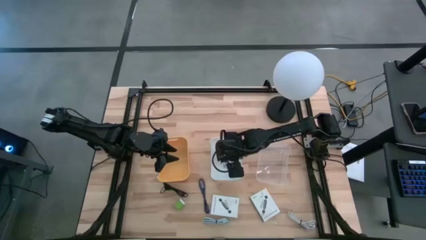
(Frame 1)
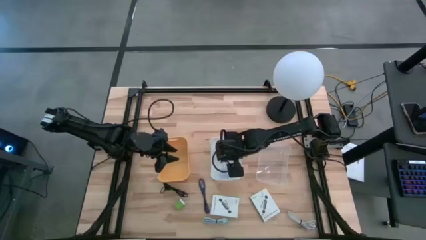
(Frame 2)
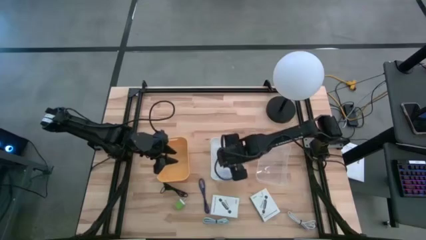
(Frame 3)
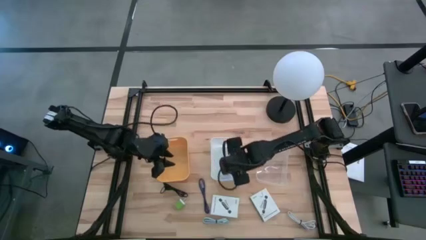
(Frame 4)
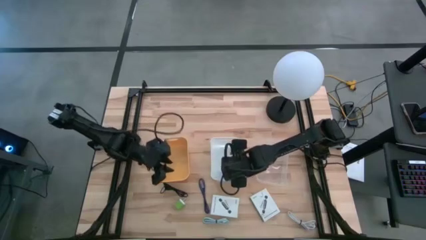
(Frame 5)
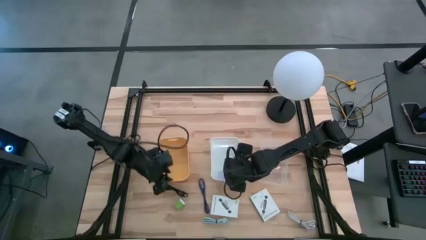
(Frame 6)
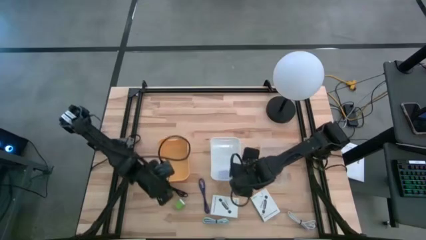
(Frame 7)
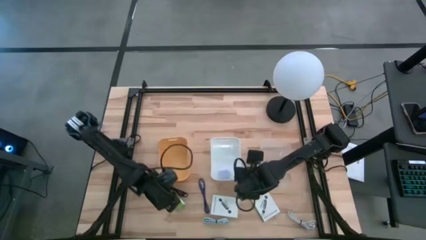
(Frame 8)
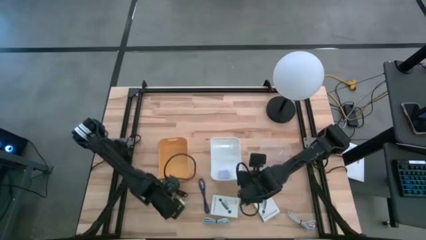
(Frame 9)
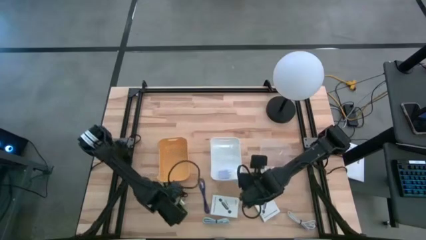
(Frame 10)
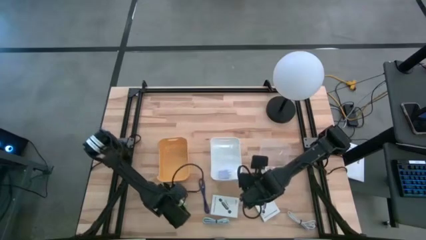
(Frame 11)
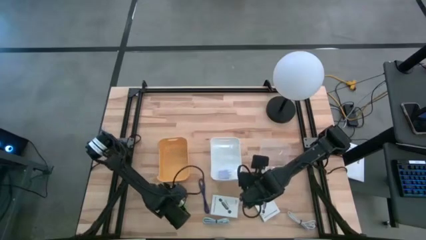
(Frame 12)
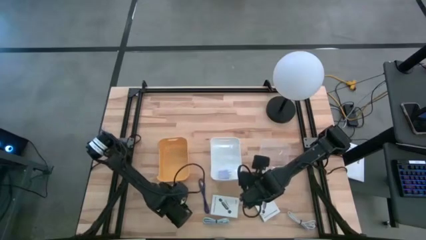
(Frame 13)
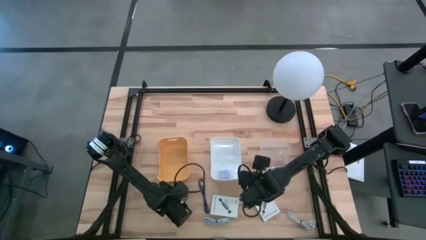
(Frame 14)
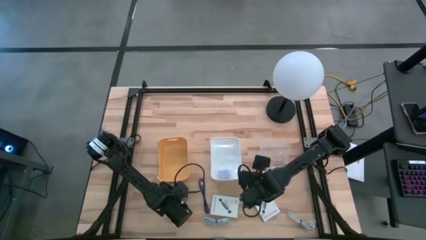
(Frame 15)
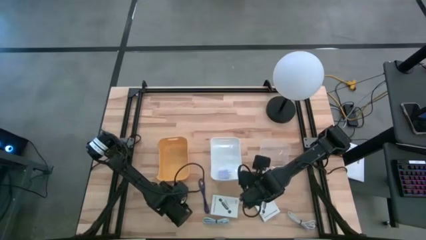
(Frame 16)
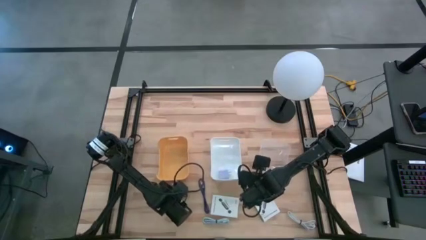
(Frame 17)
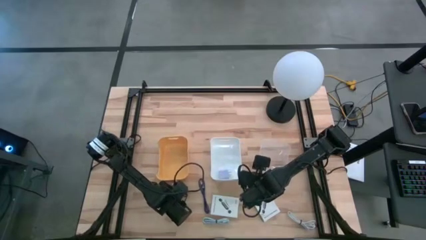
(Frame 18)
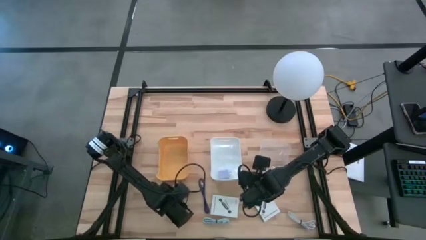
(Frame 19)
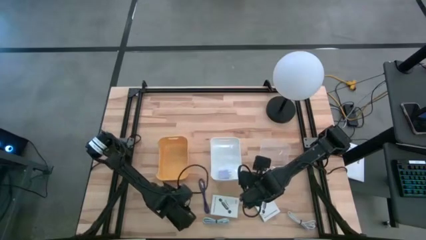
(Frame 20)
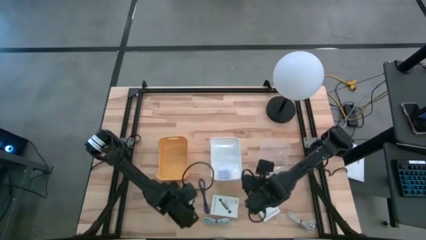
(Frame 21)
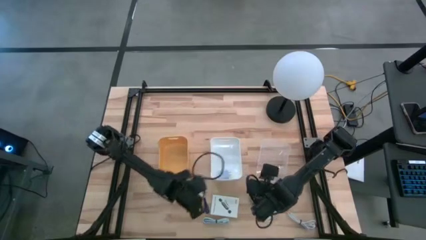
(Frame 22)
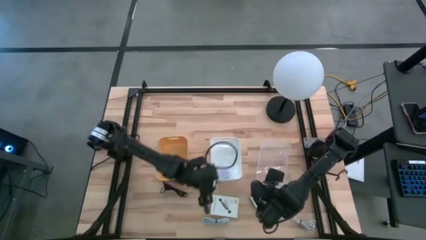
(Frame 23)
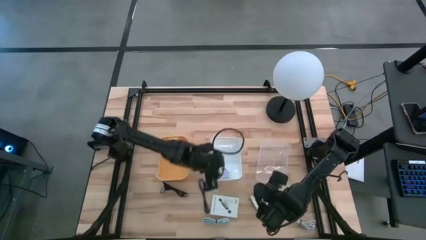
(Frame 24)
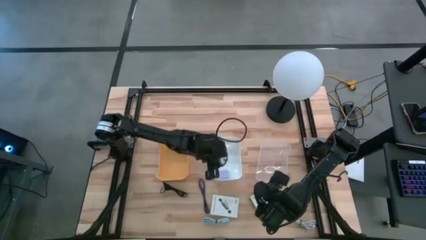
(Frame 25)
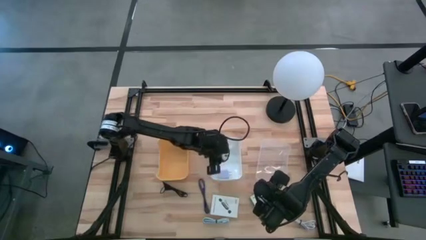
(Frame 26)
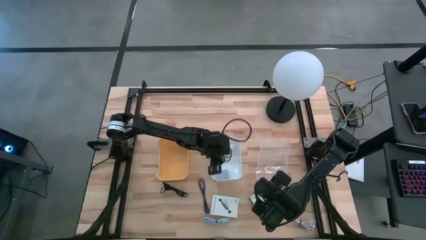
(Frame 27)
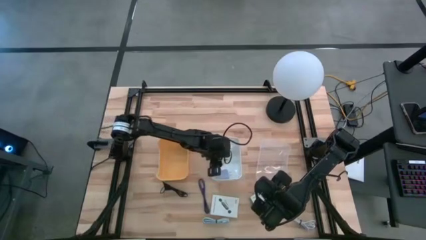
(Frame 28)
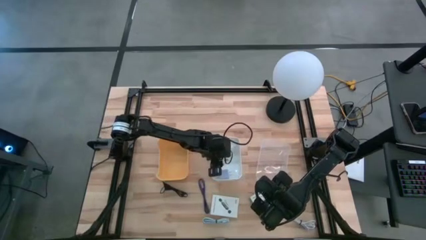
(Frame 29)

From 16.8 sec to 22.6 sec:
Task: Pick and place items into bin
Put the green charger adapter into the white bin

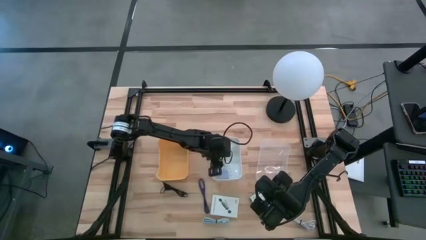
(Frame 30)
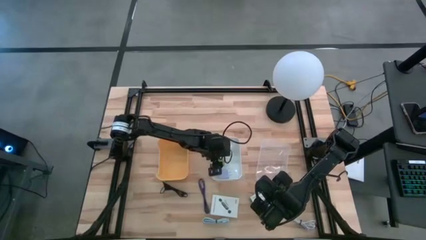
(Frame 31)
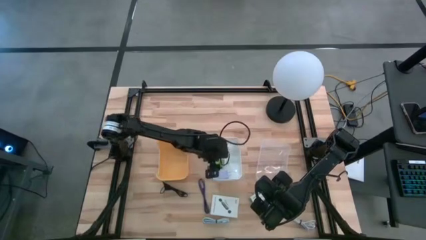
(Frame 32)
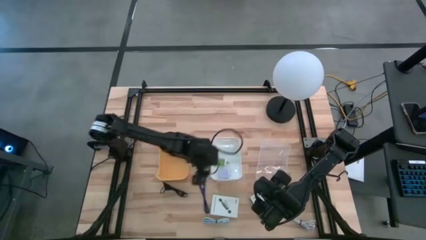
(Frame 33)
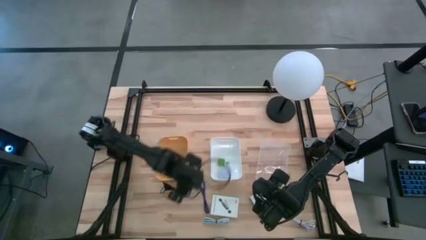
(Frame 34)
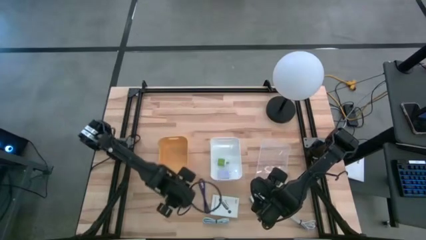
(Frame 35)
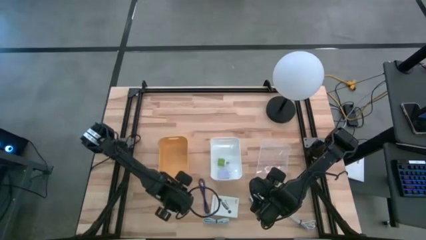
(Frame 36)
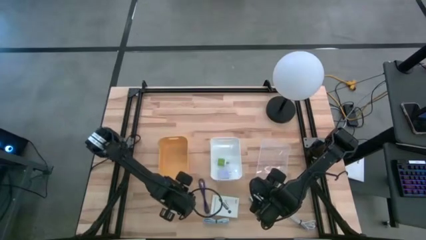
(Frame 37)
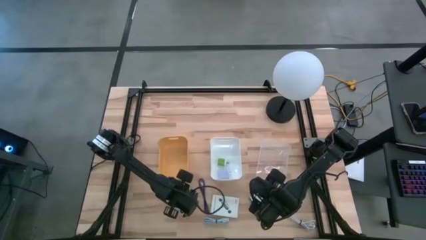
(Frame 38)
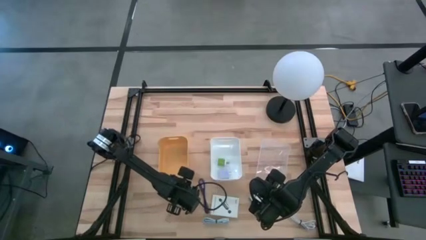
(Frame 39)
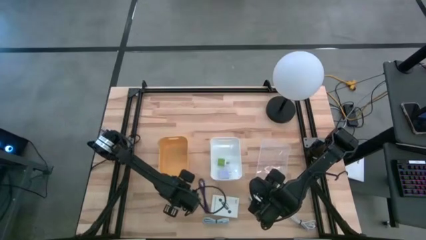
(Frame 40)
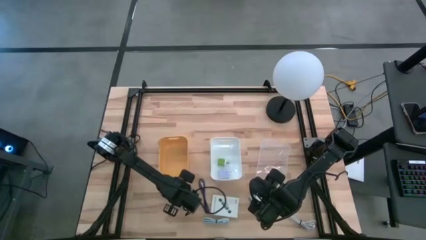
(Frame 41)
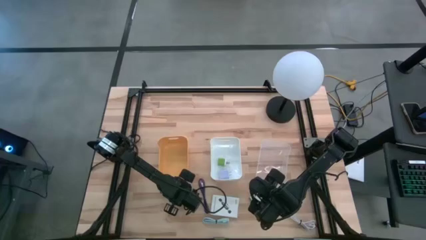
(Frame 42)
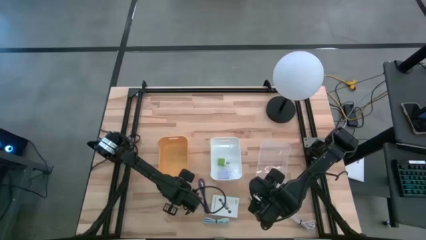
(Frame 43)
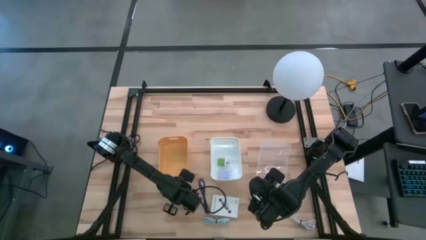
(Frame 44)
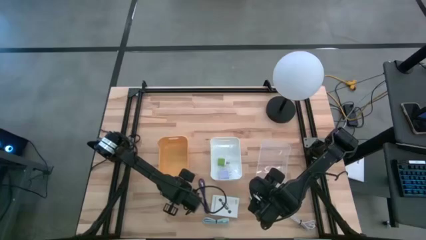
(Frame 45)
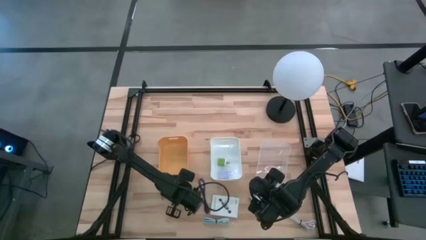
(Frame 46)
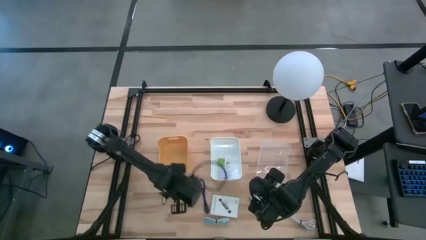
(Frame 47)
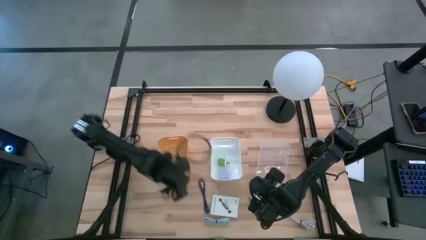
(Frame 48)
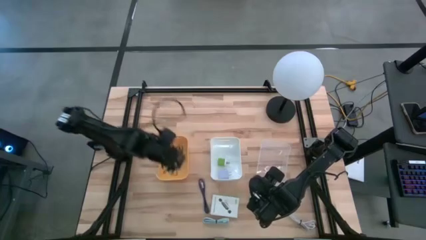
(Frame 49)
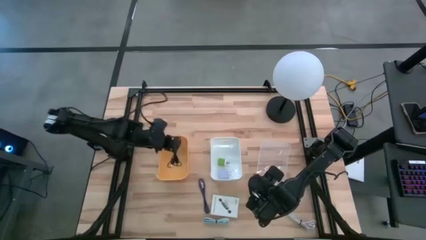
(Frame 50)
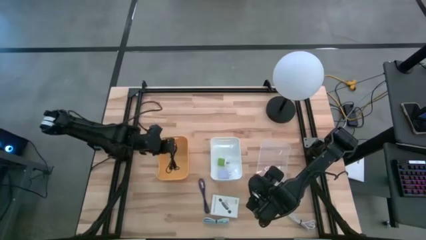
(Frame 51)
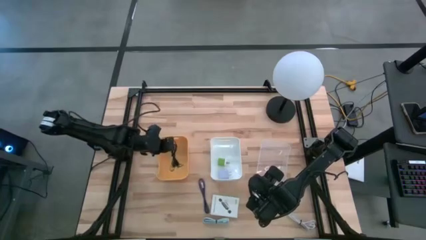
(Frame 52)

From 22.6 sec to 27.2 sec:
Put the black charger cable into the yellow bin

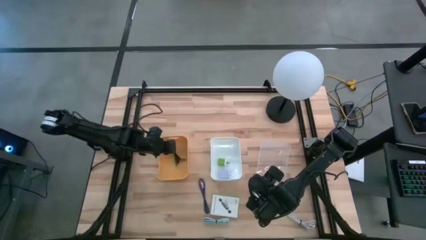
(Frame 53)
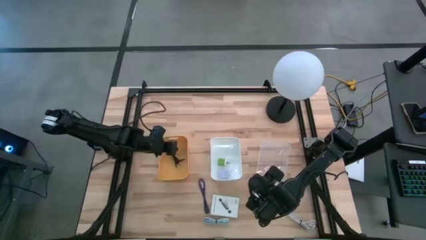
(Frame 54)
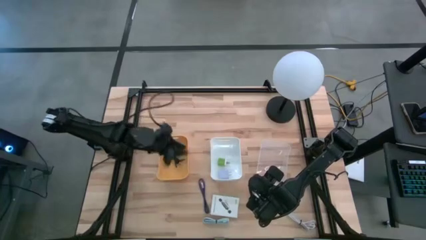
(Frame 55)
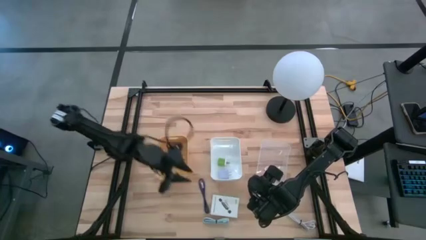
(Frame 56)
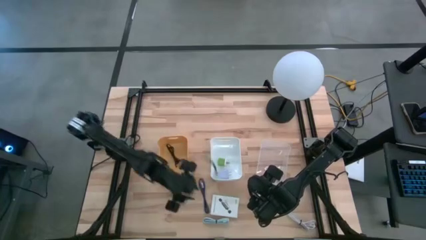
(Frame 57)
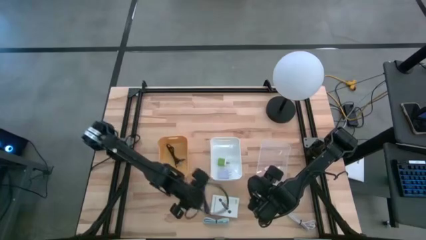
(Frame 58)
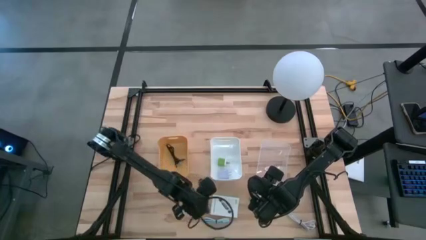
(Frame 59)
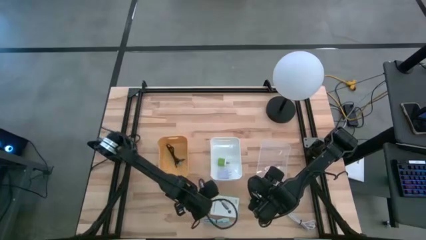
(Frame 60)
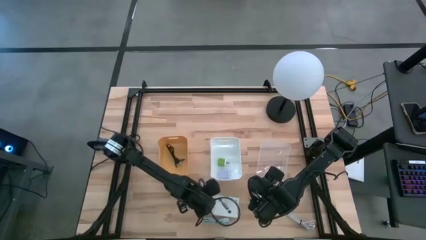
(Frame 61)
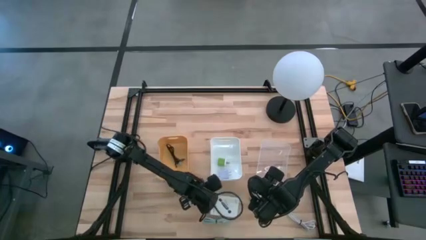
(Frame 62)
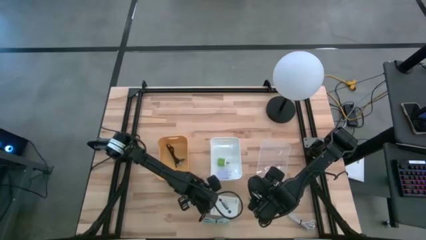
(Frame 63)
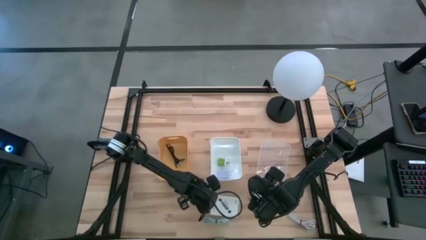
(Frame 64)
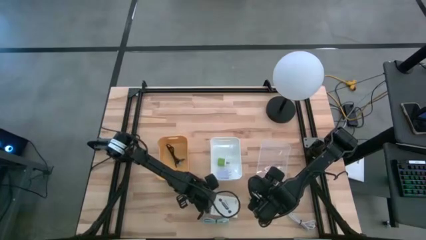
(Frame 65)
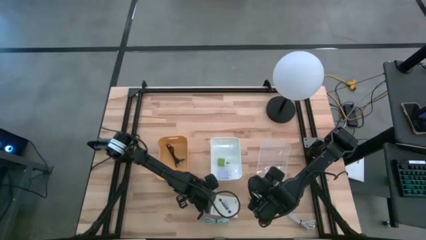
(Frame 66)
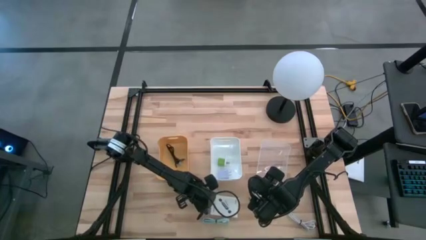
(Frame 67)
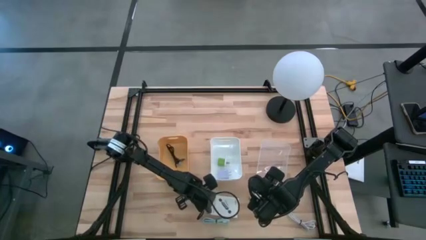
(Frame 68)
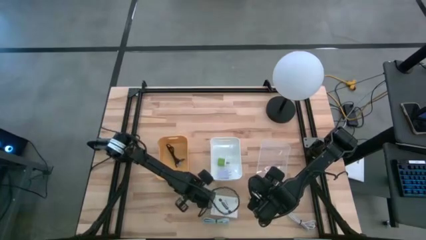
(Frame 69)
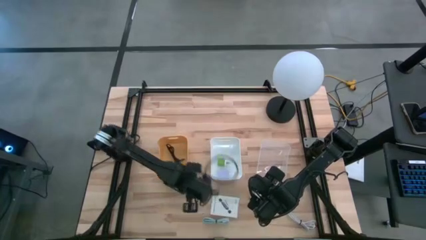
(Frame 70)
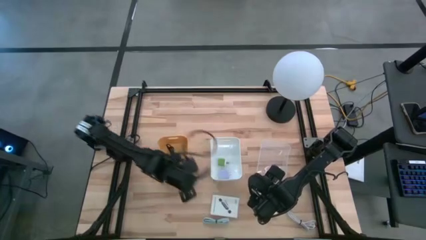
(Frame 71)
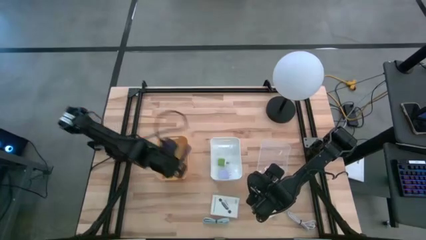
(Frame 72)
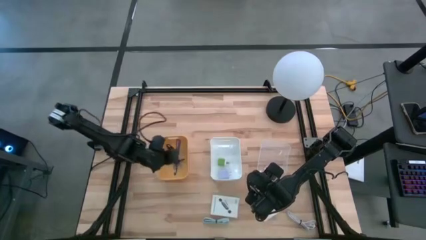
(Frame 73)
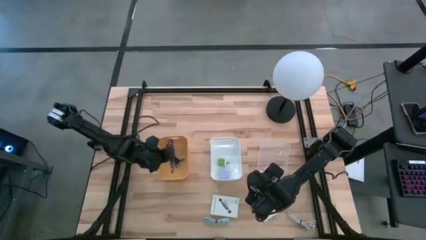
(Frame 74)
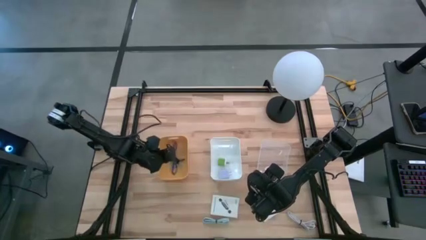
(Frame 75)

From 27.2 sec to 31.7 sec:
Put the purple charger cable into the yellow bin

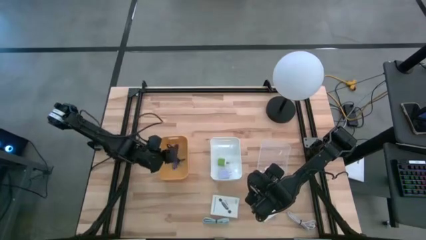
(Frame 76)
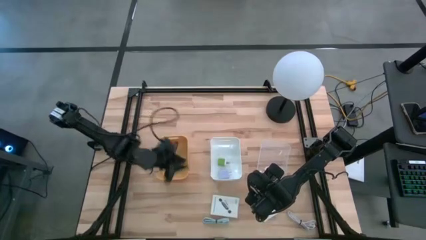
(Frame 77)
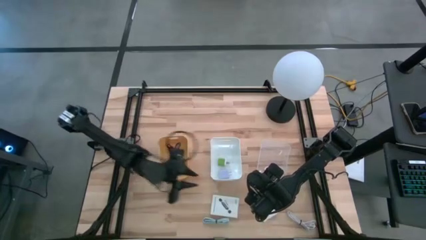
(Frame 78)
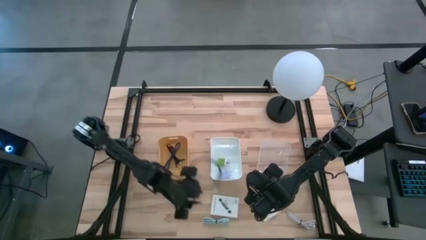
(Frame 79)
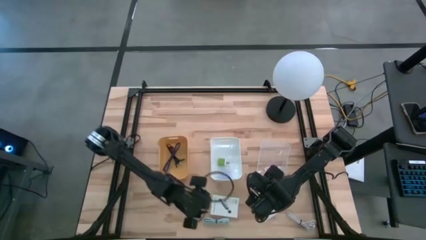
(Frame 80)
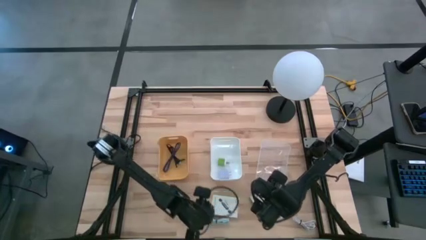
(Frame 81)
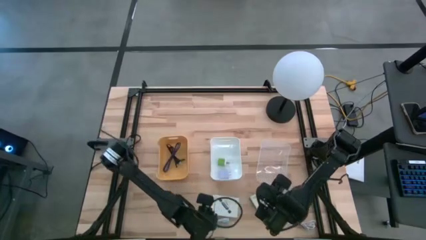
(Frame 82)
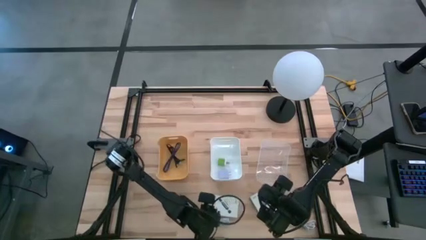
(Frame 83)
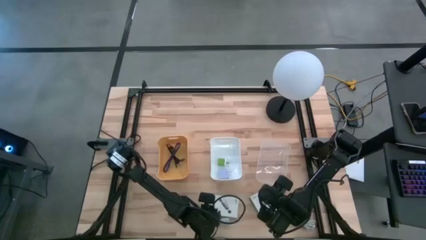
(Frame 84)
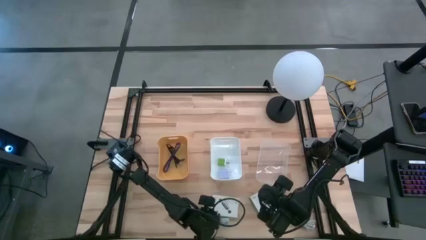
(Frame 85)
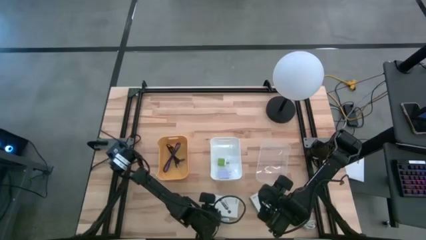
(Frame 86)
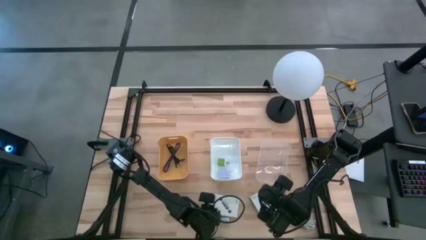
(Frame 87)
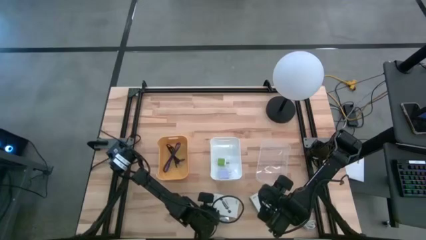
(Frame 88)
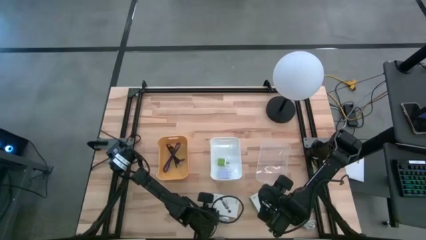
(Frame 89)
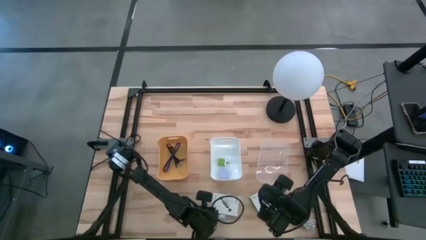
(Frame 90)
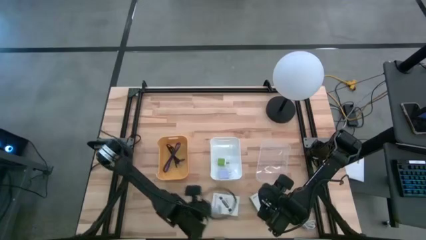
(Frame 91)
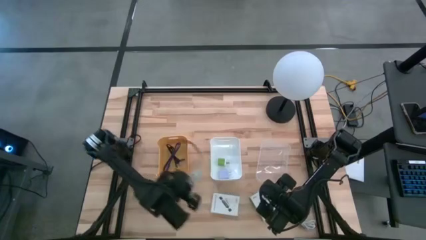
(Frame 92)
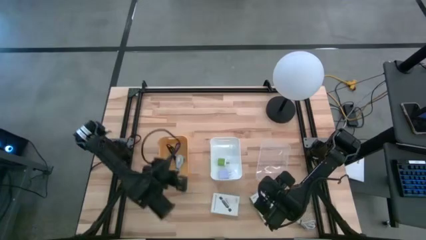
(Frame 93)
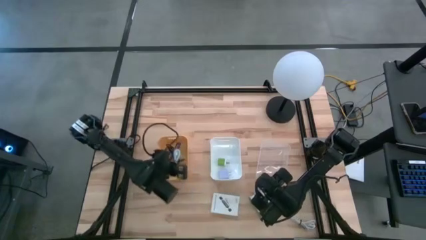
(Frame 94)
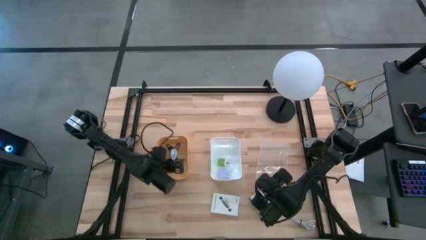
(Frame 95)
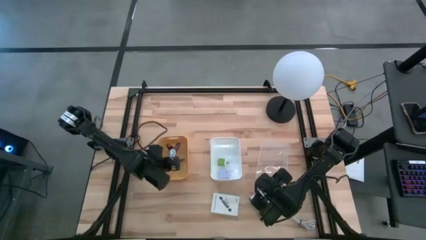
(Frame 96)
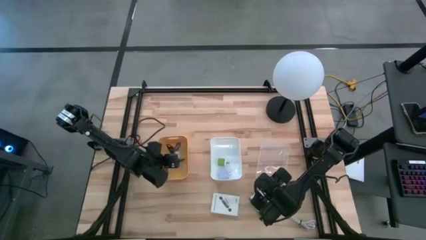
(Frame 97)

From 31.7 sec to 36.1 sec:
Put the light blue charger cable into the yellow bin
